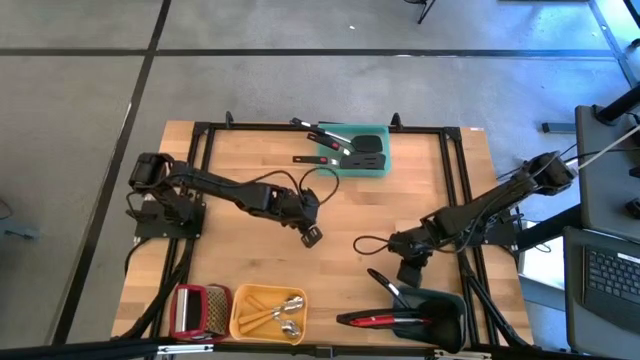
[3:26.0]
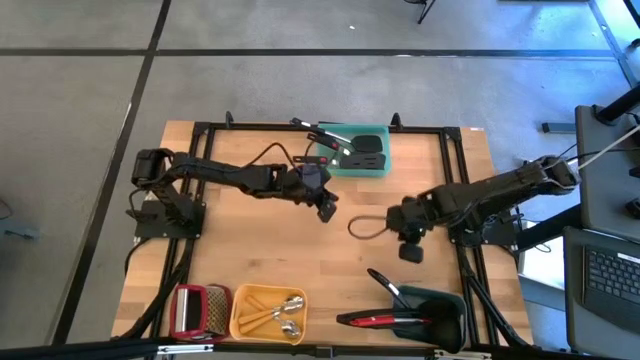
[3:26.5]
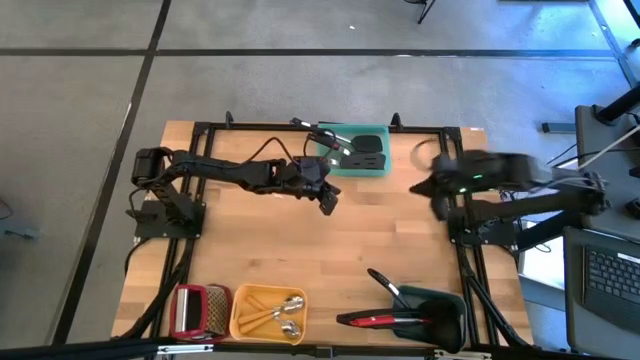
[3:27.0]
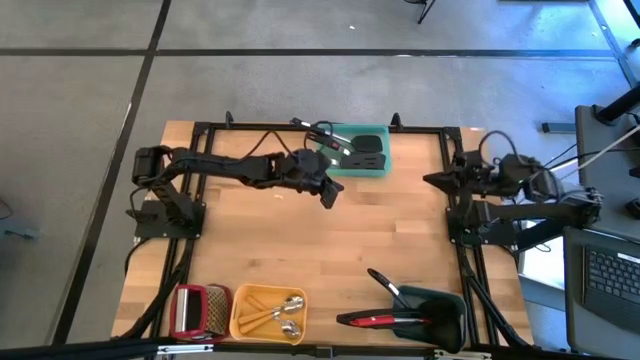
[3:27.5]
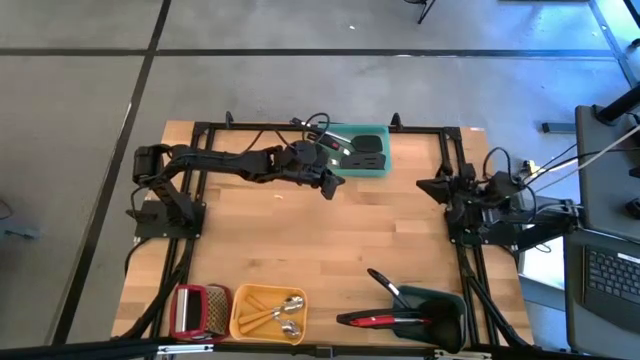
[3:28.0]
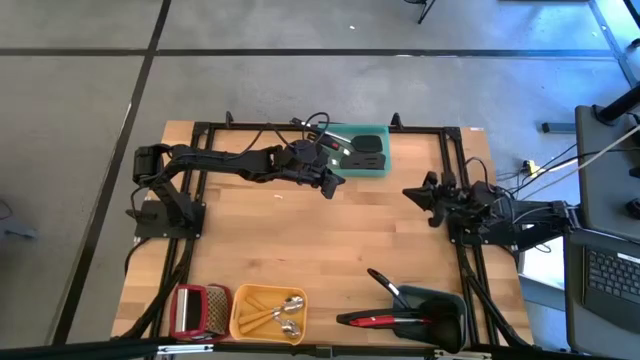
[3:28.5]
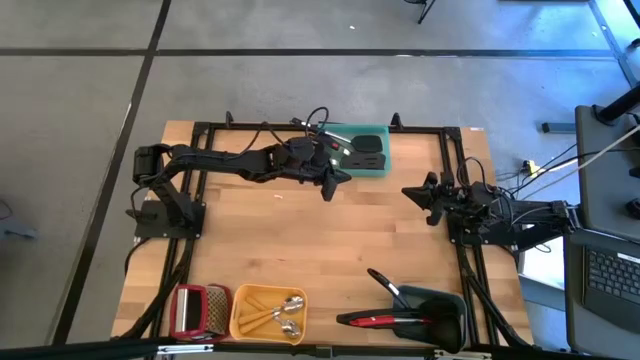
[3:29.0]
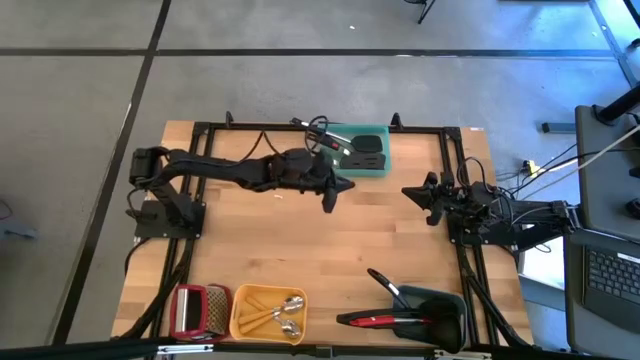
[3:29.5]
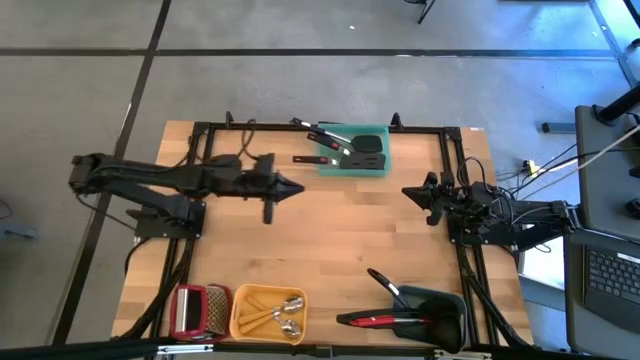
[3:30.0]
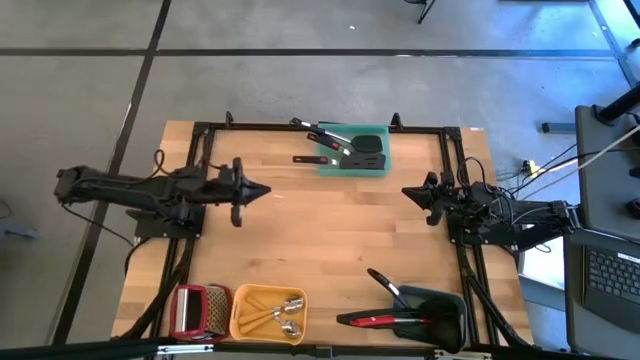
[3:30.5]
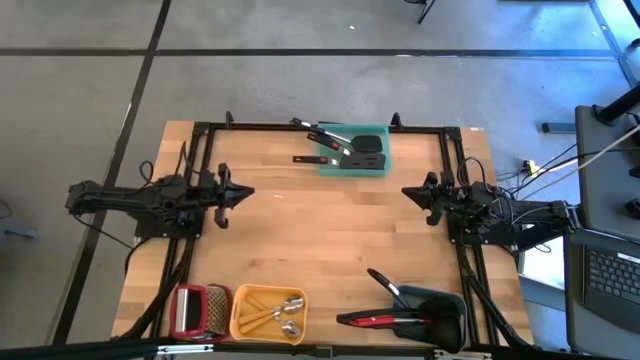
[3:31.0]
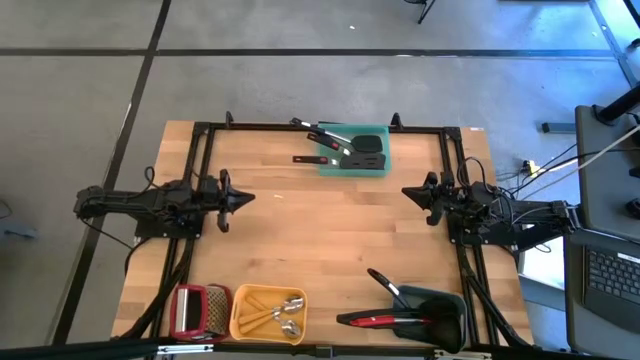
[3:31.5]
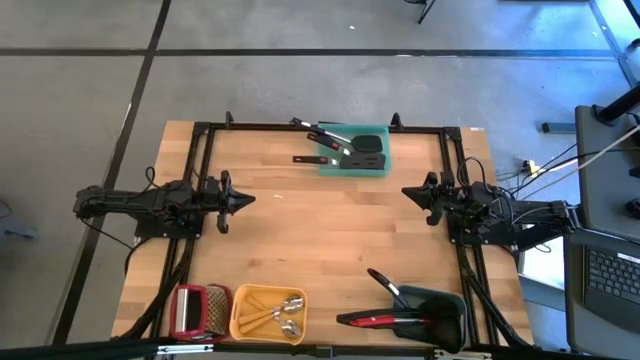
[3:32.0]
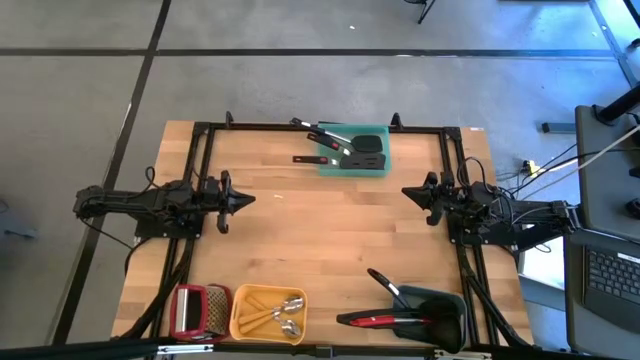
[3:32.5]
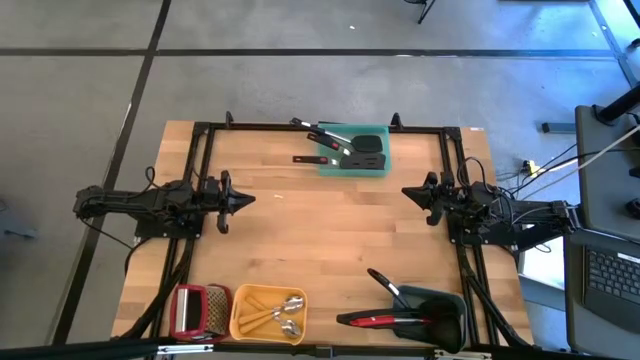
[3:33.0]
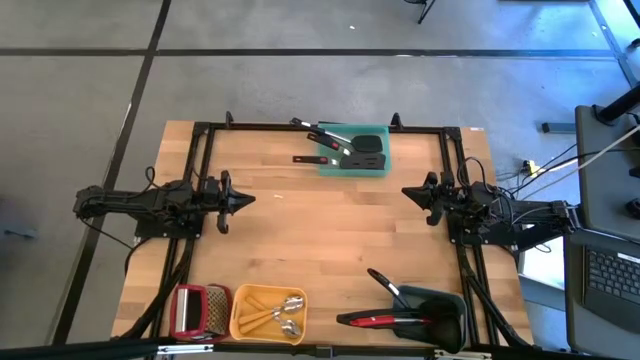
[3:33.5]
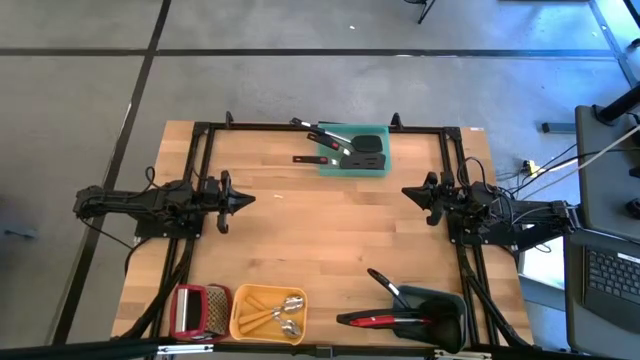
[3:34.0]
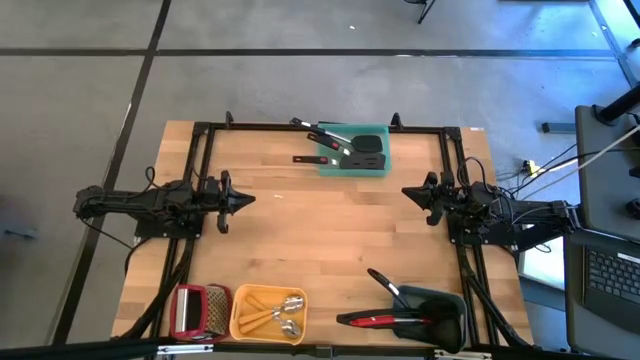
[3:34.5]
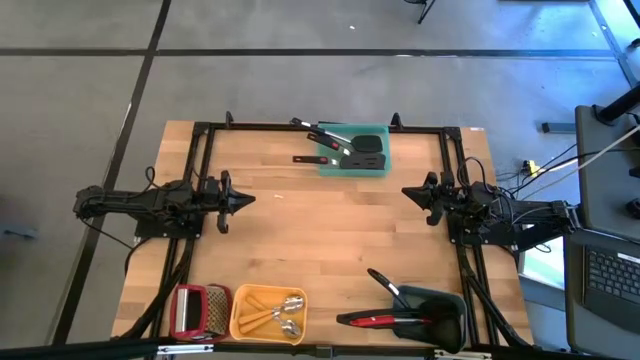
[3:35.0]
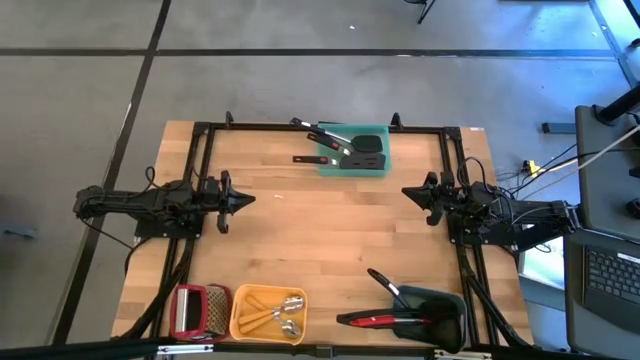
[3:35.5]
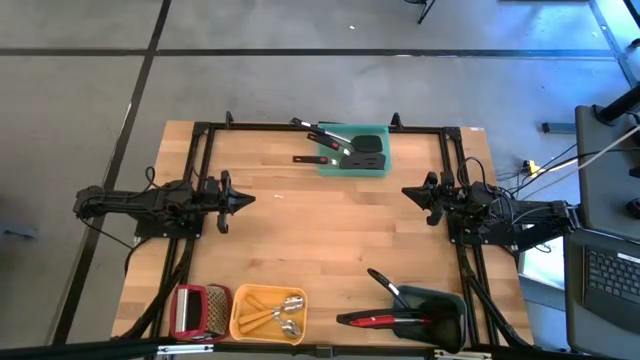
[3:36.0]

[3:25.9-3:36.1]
Task: Pick & Place Kitchen Items
Return to Home Position

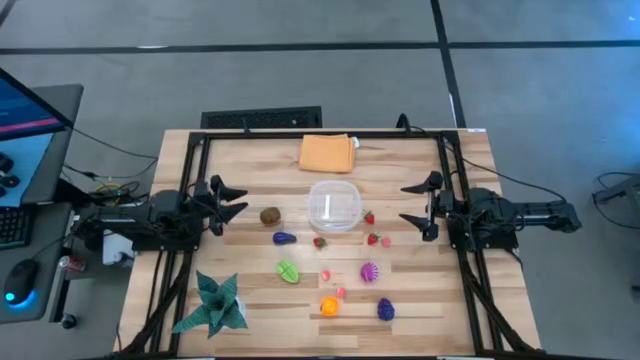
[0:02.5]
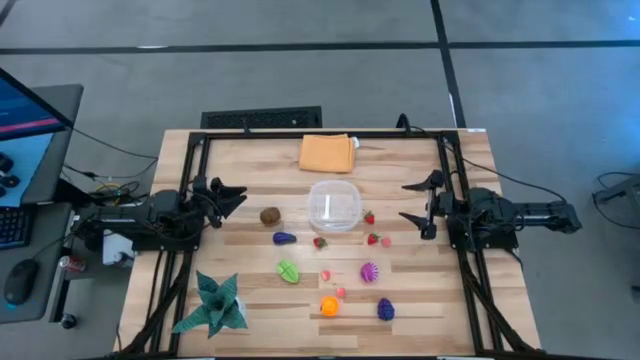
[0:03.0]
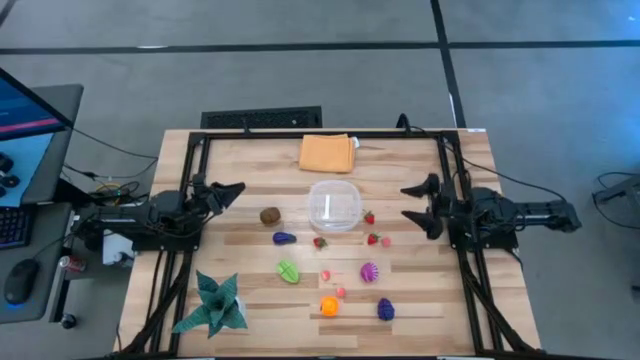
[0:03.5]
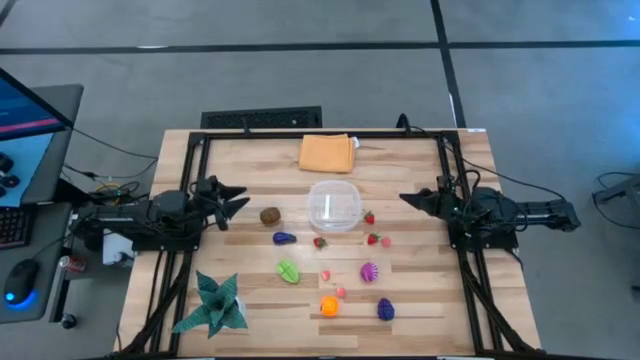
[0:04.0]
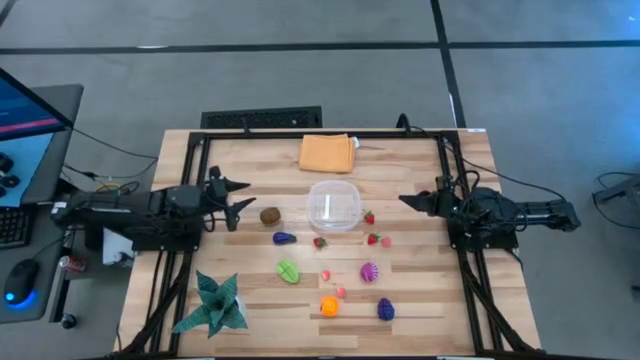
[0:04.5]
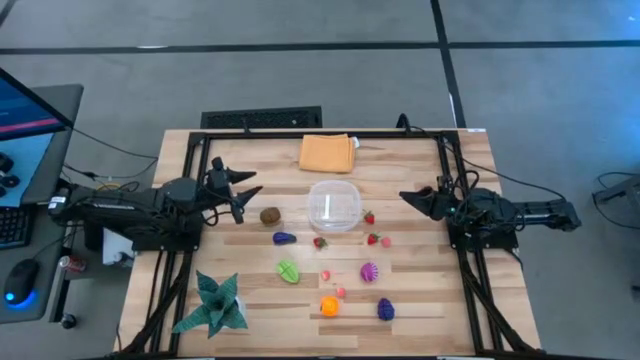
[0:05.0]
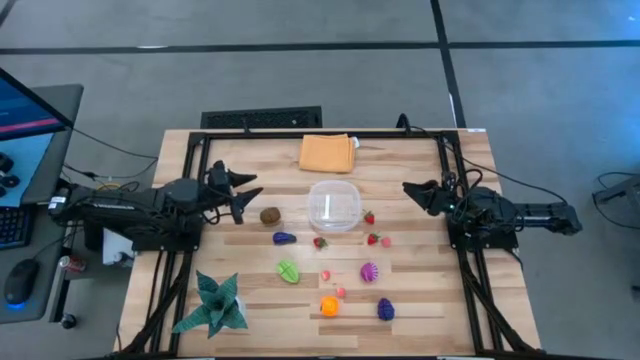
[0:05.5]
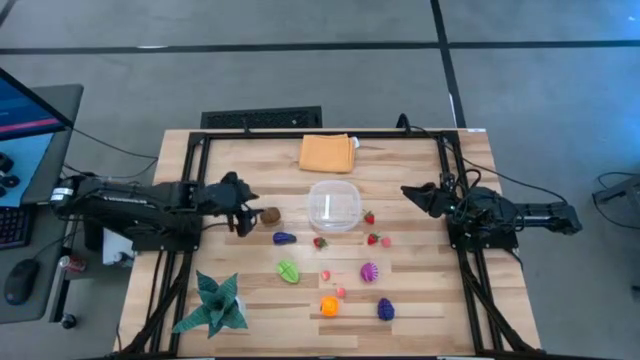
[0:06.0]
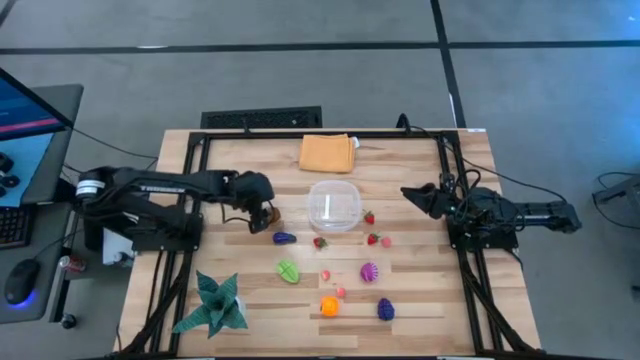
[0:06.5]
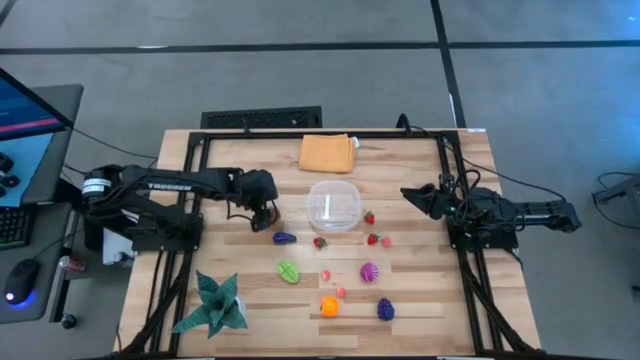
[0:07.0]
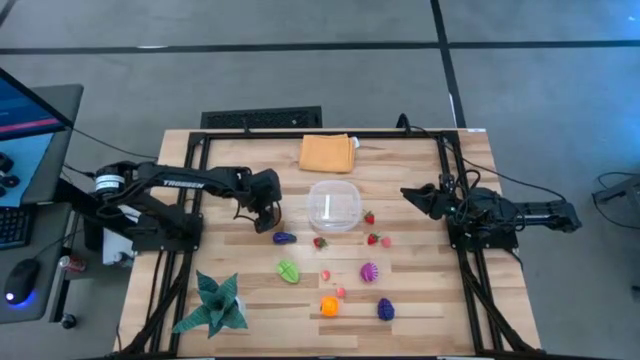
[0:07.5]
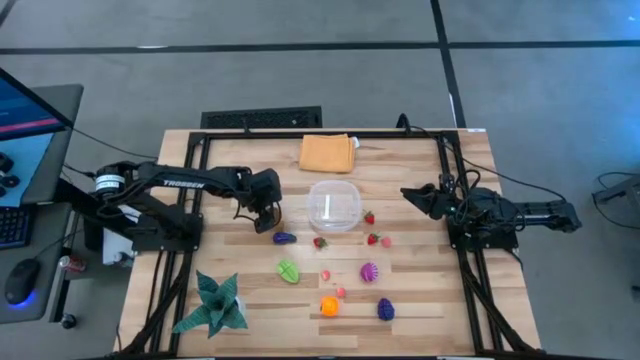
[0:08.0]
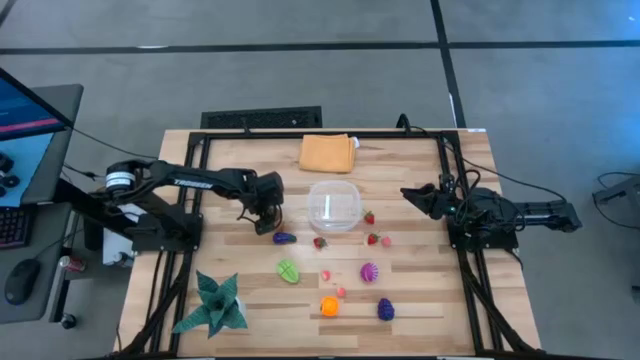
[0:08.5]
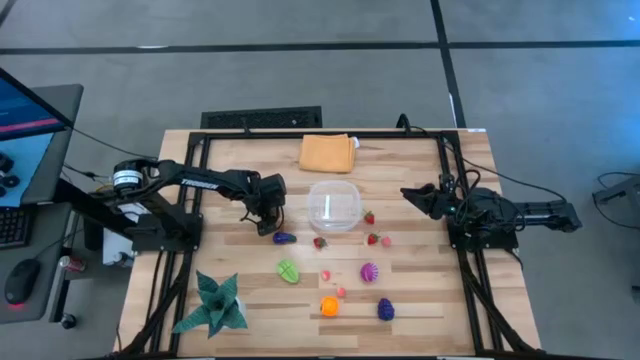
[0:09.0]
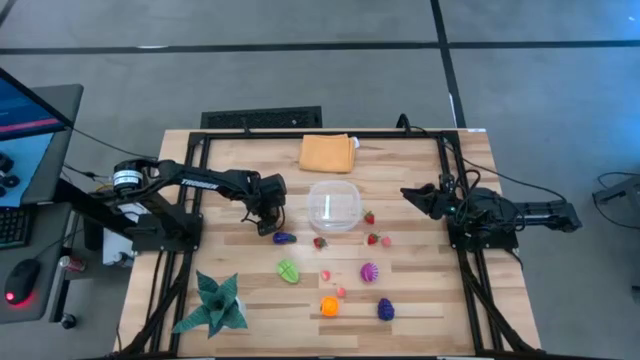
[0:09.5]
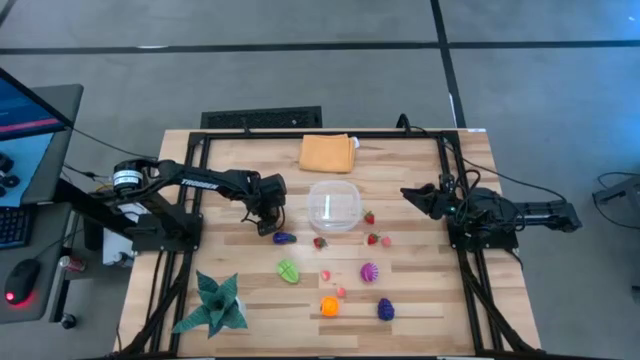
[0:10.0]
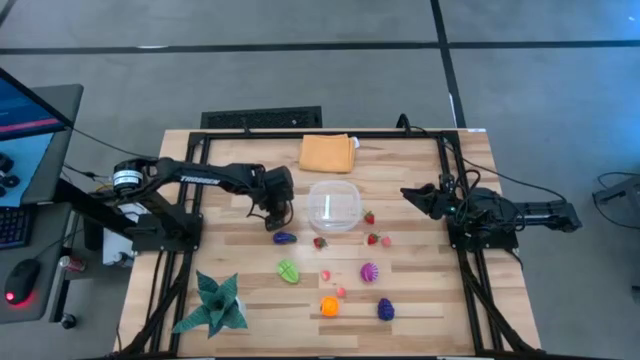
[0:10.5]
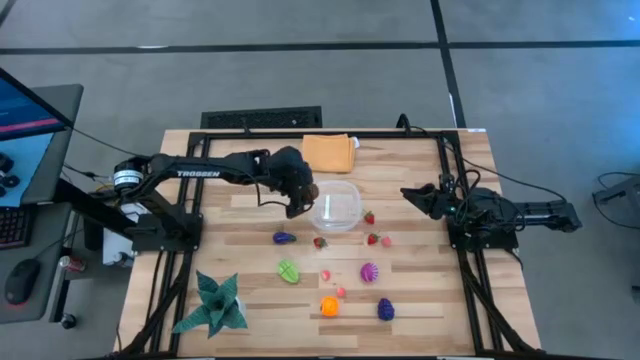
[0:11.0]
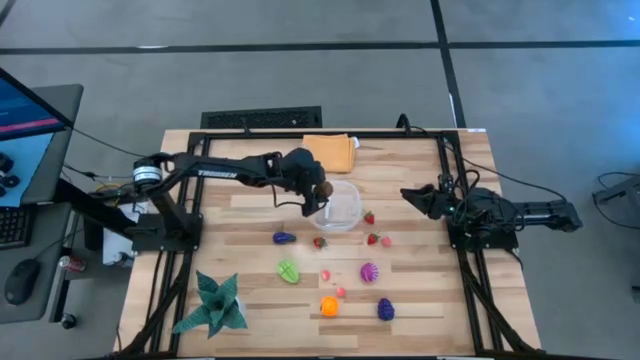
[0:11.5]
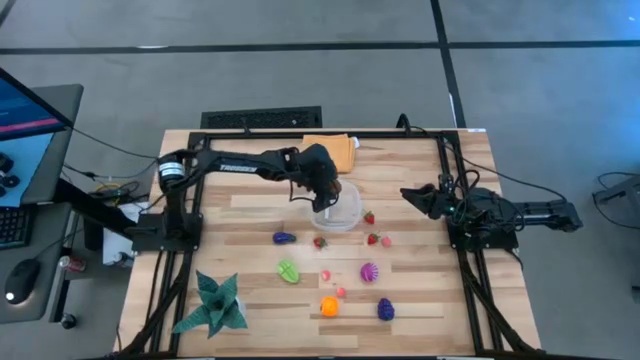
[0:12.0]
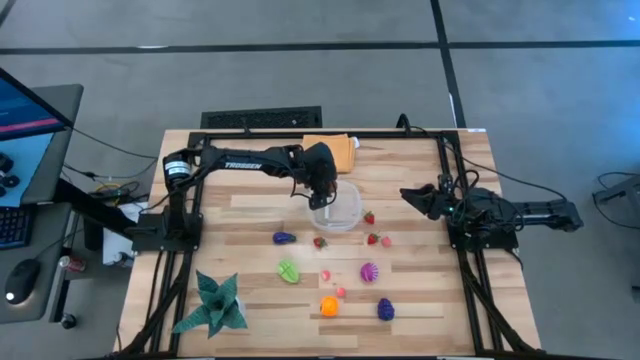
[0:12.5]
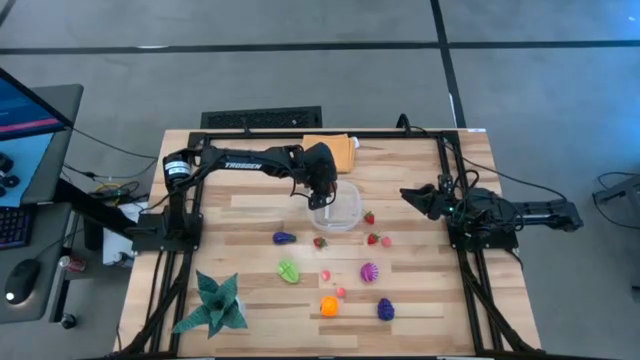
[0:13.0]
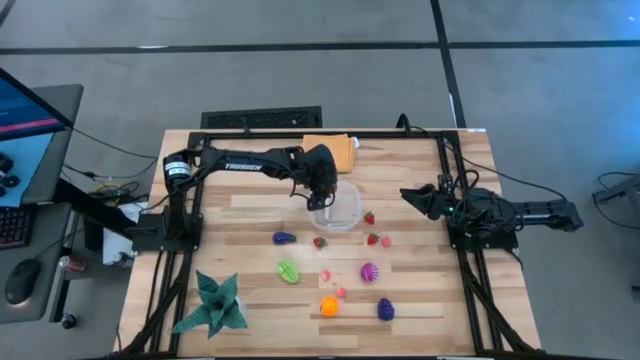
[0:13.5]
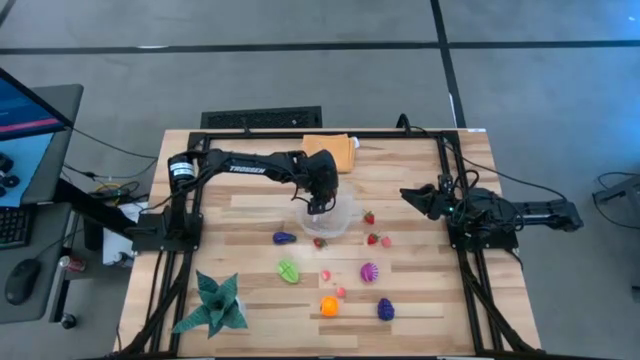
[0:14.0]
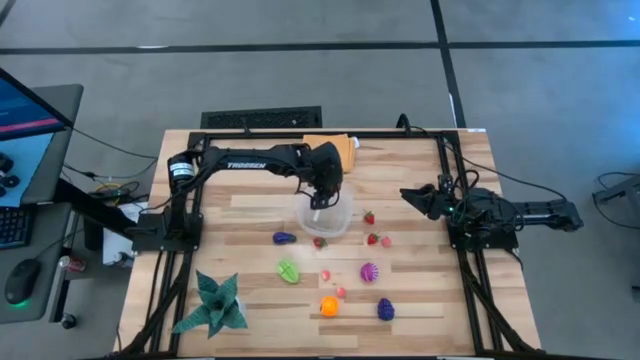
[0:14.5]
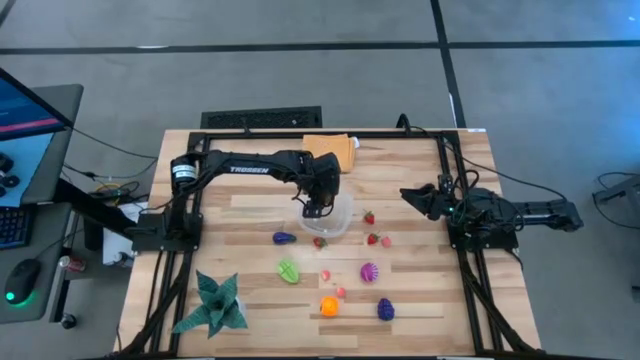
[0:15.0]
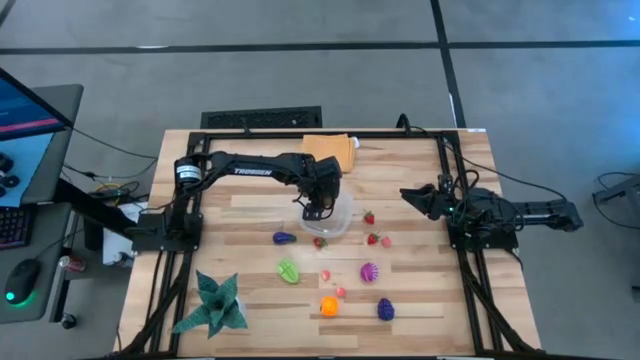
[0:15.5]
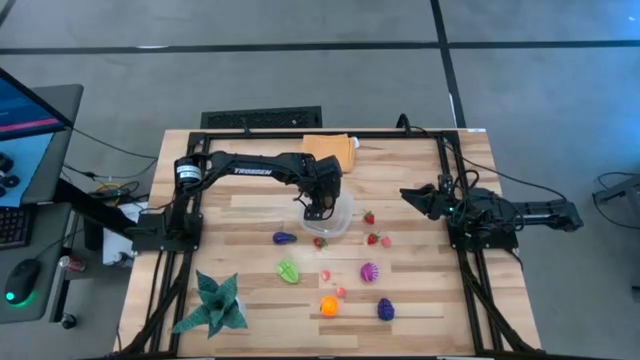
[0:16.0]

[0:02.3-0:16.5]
Task: Pick and placing Produce into tupperware
Put the brown kiwi into the transparent container
